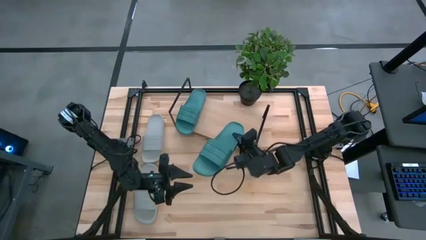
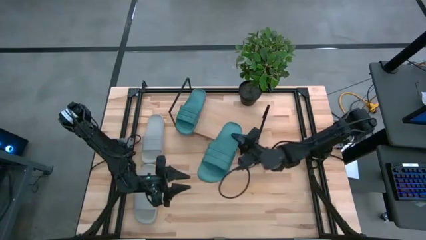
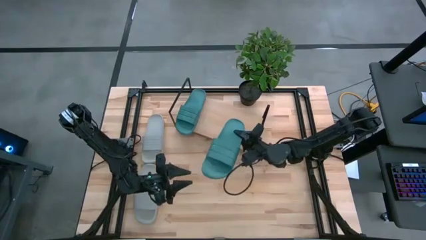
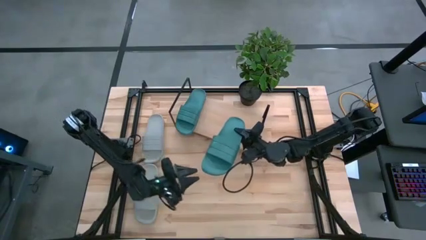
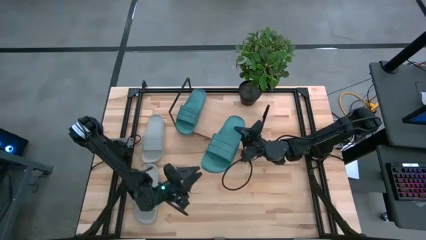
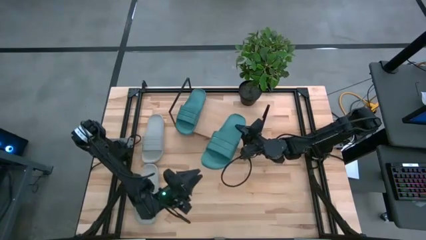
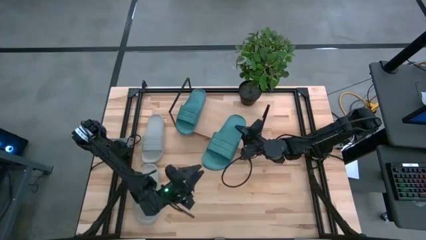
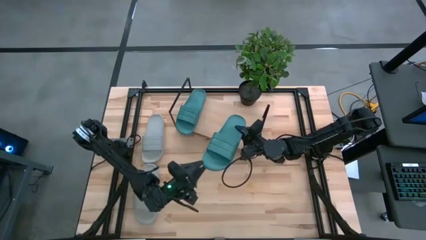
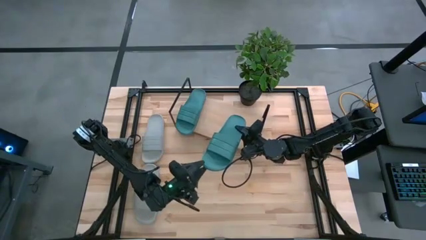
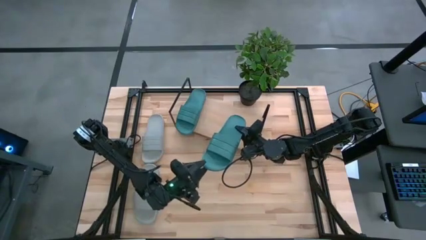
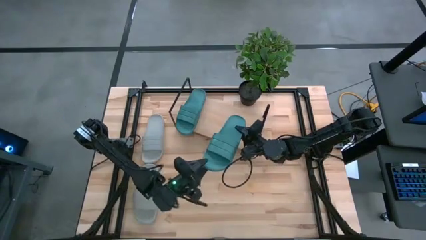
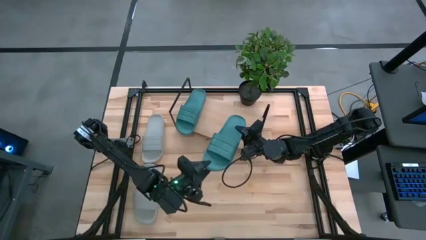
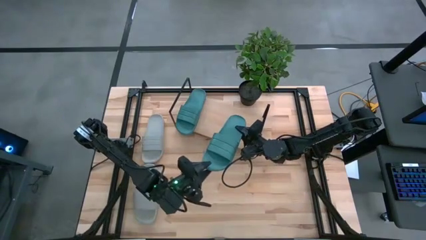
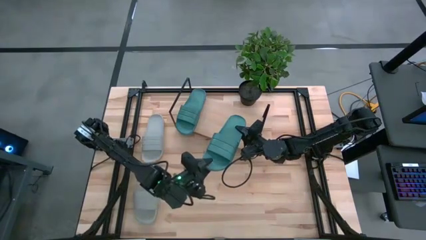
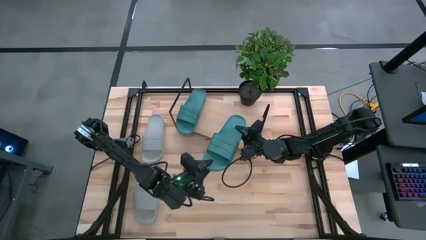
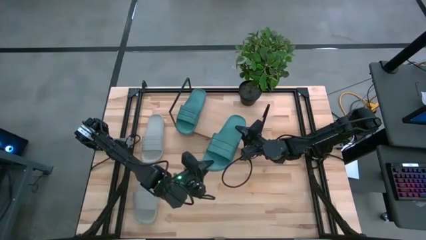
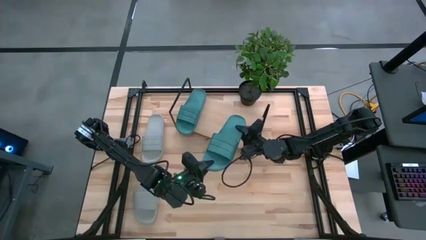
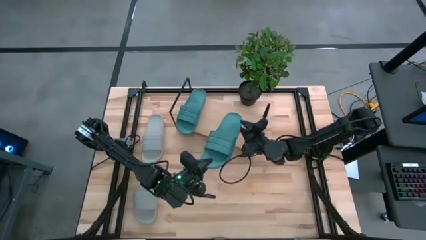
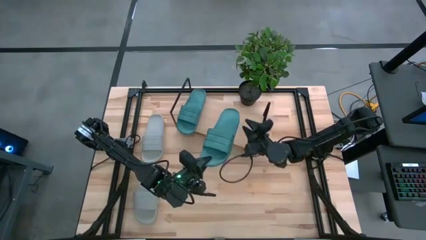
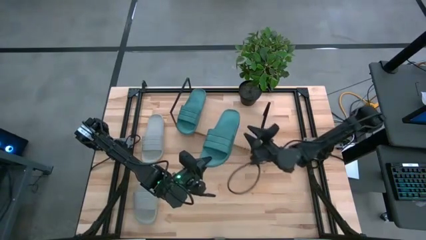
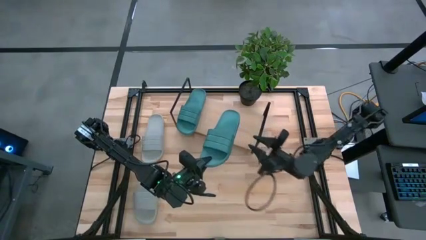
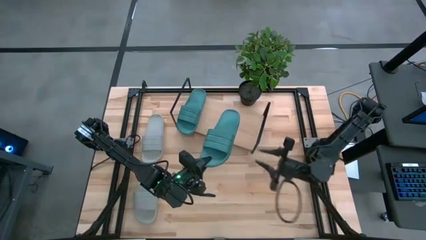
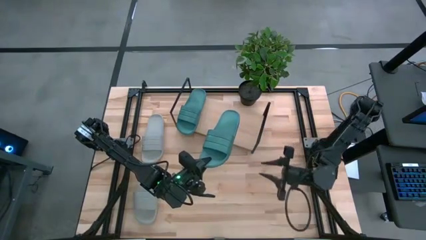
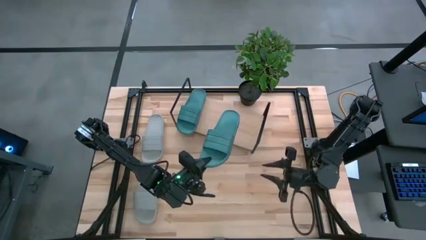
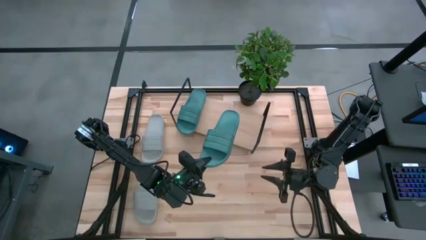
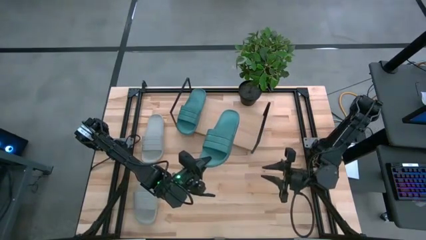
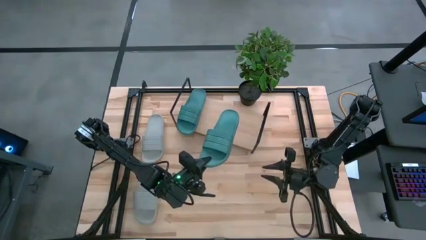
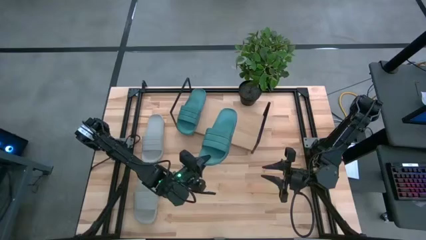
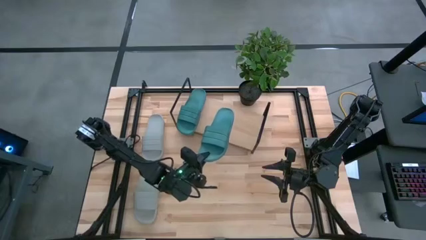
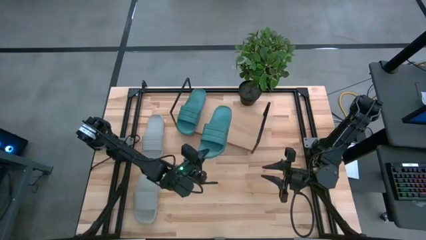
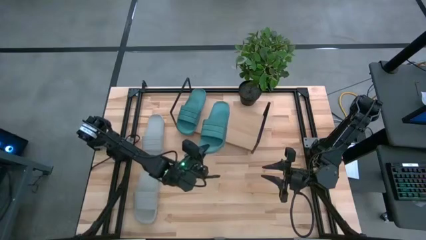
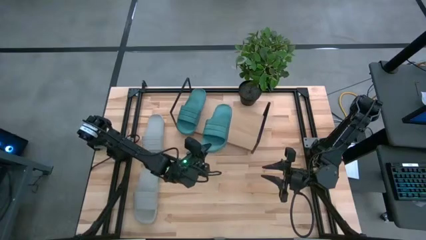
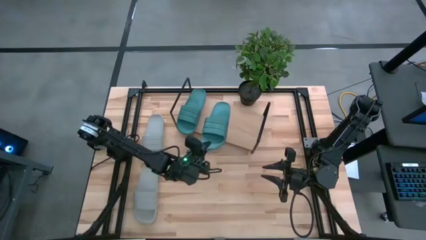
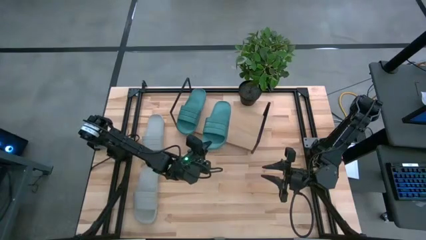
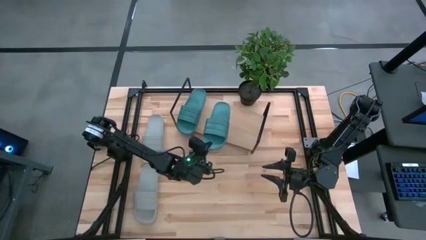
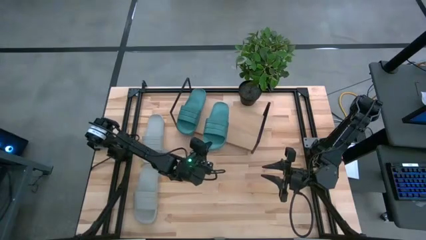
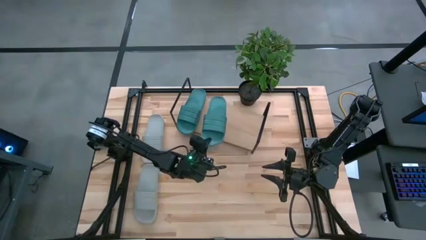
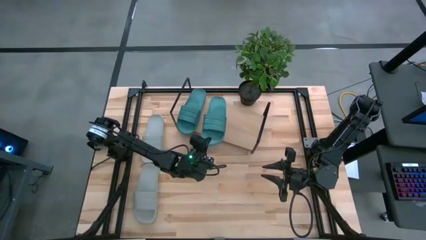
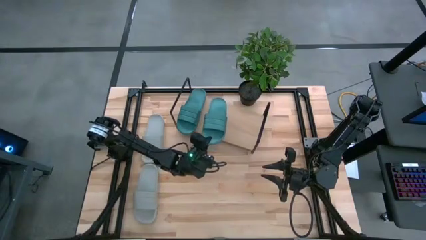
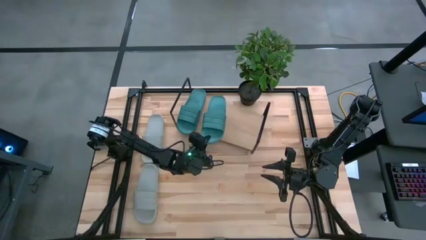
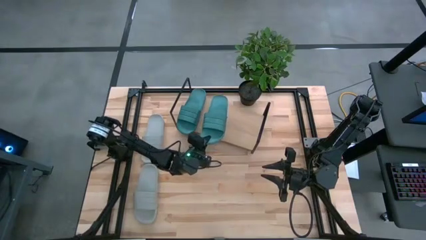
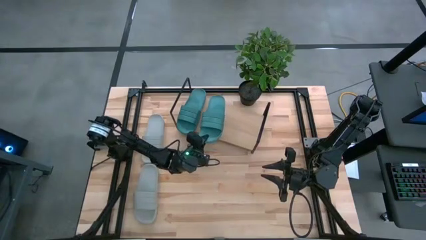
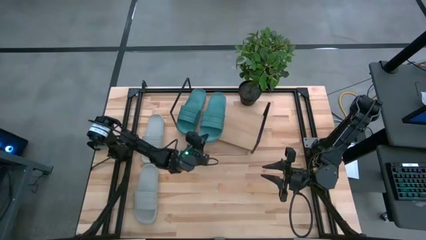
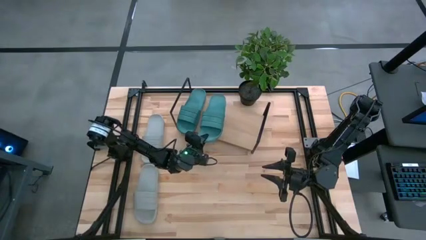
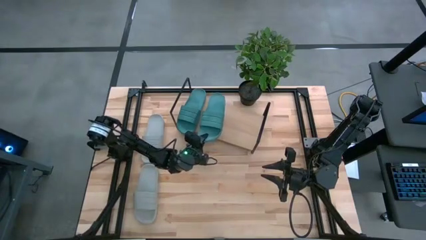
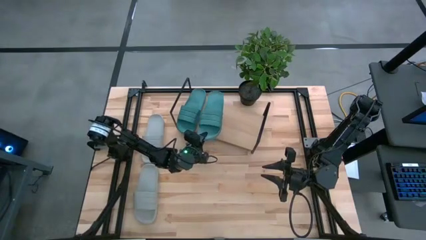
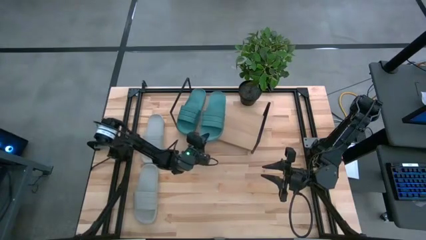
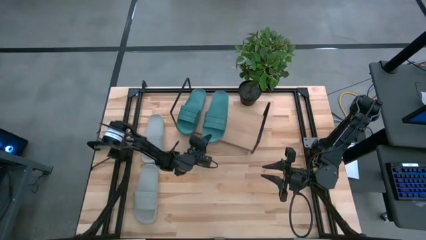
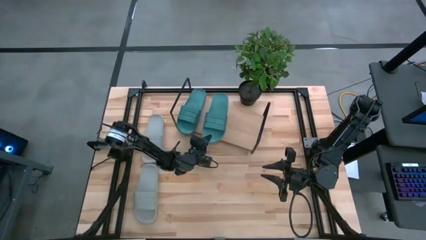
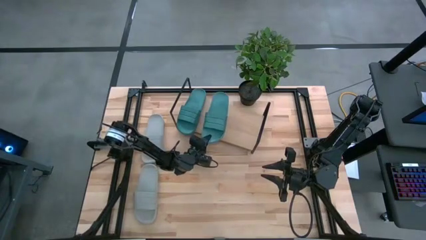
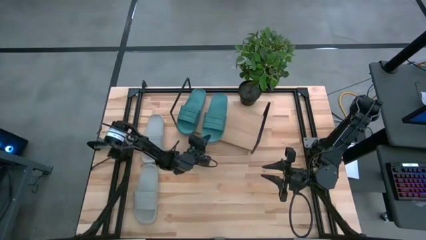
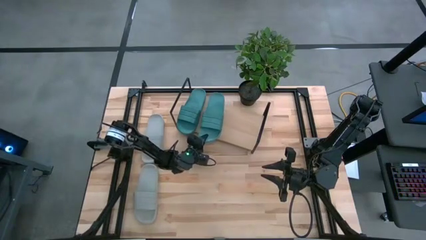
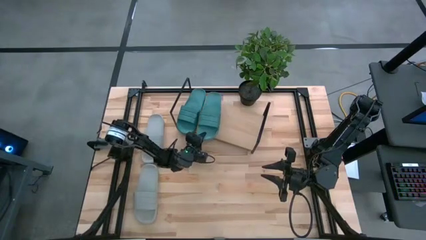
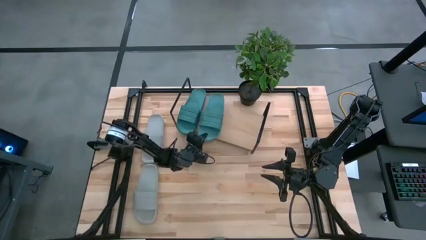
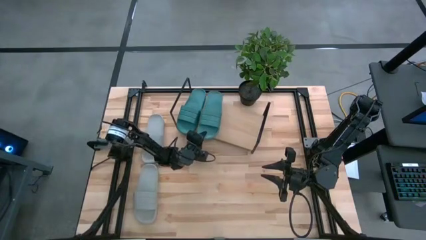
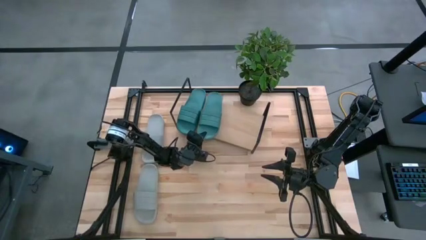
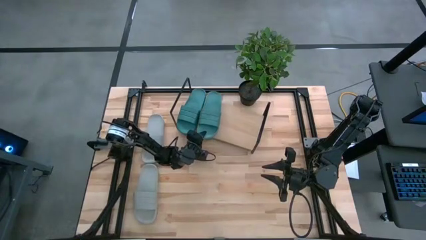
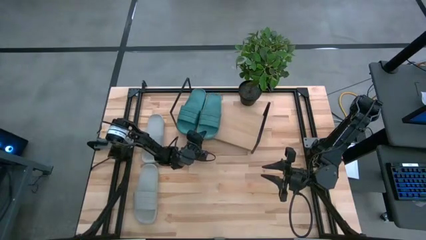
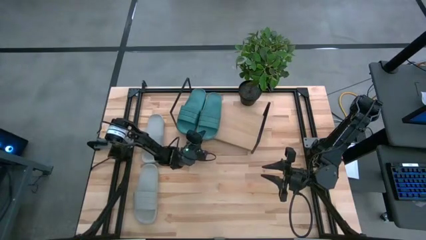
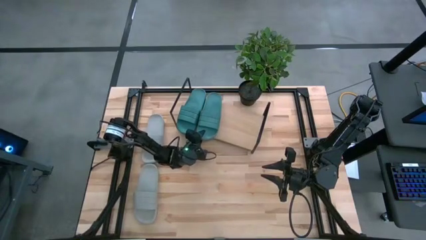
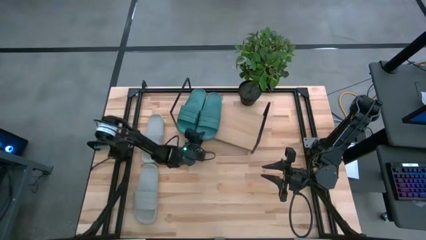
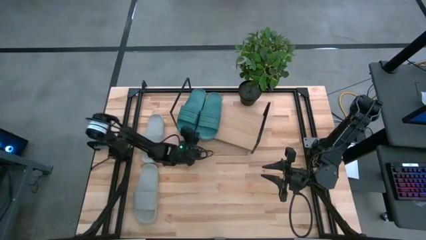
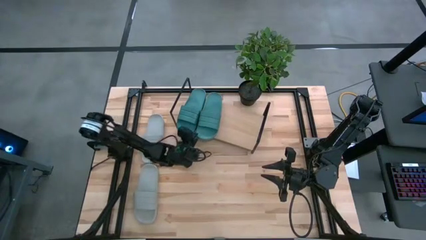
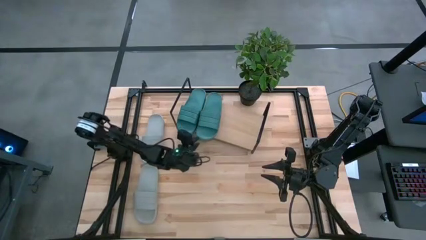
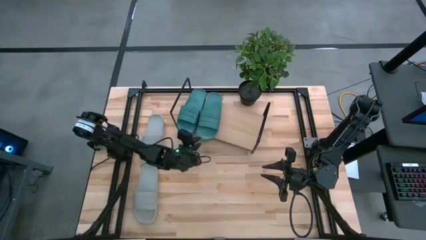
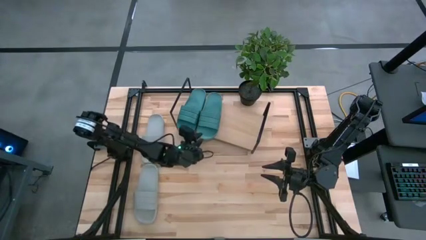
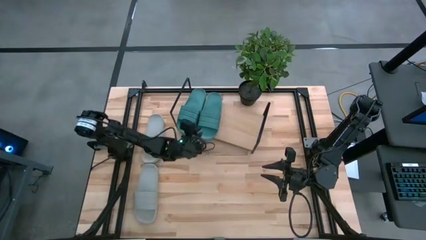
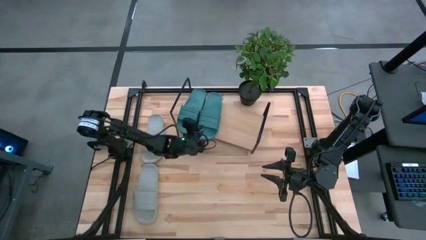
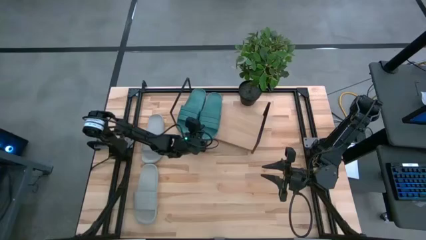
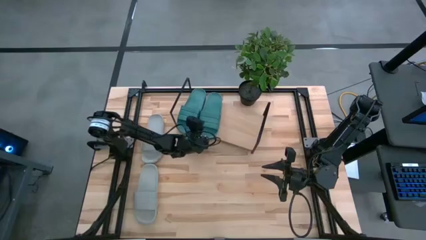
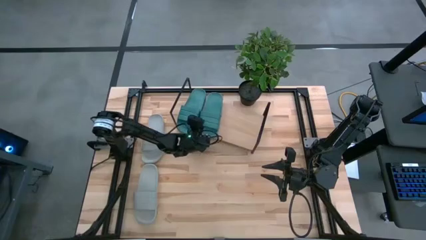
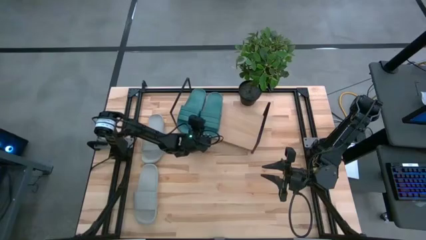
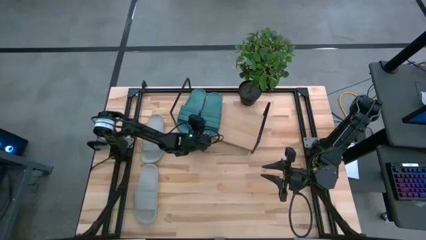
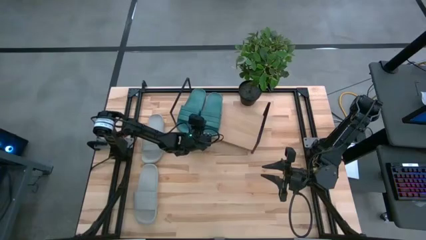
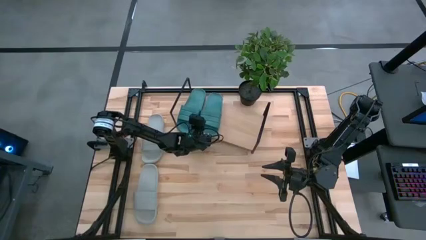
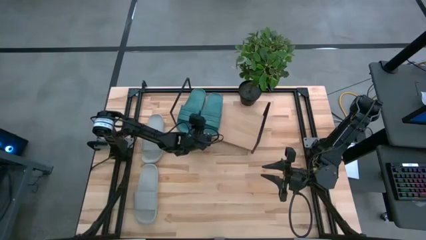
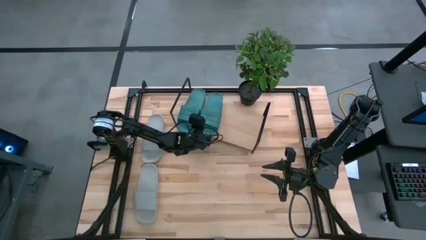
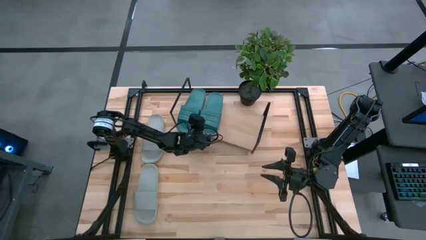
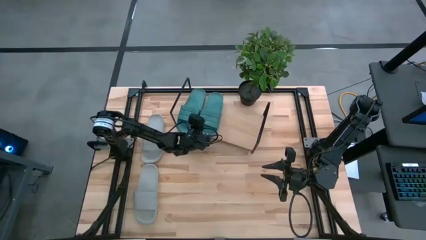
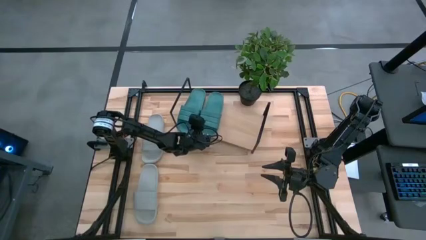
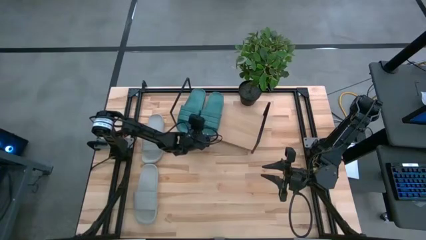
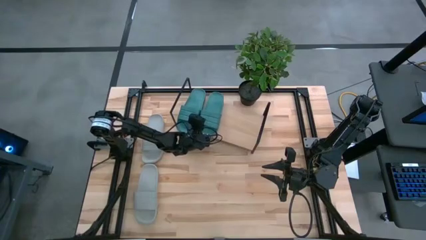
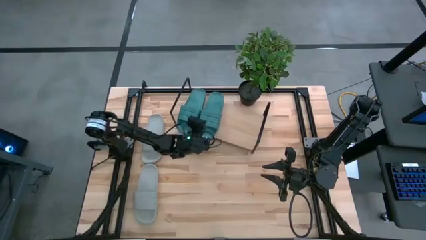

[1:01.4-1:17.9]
Task: Pick and place slides into the shelf
Put the green slipper on the shelf
